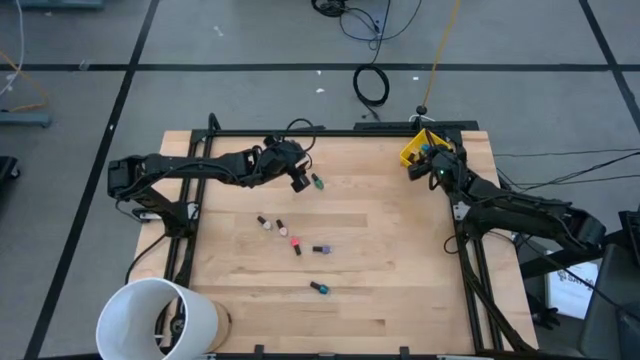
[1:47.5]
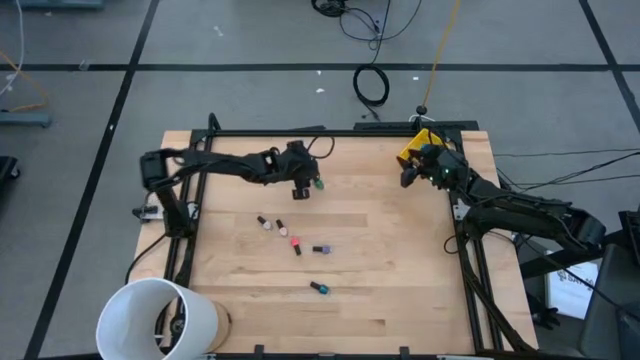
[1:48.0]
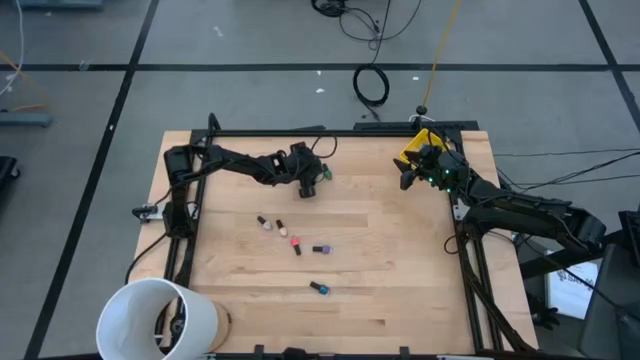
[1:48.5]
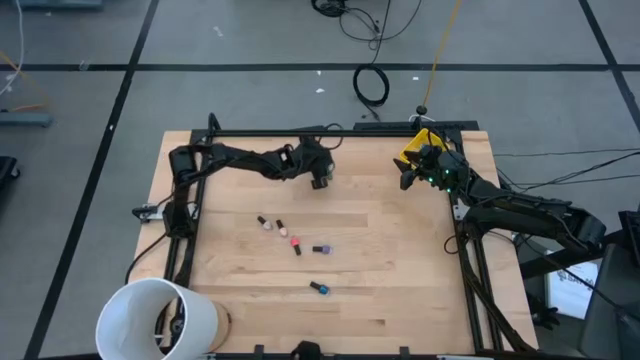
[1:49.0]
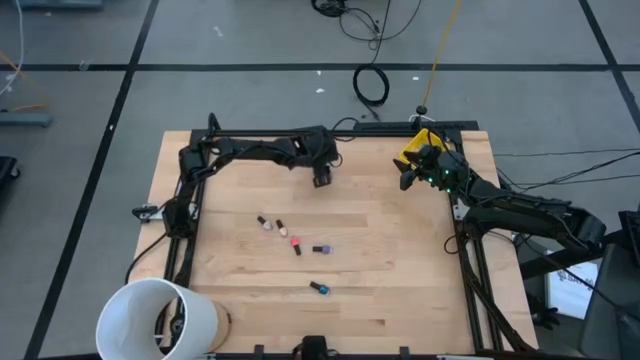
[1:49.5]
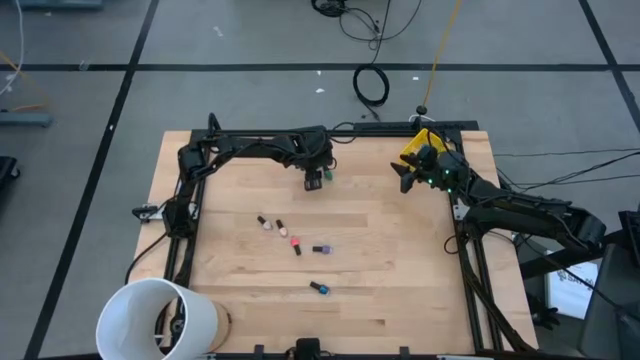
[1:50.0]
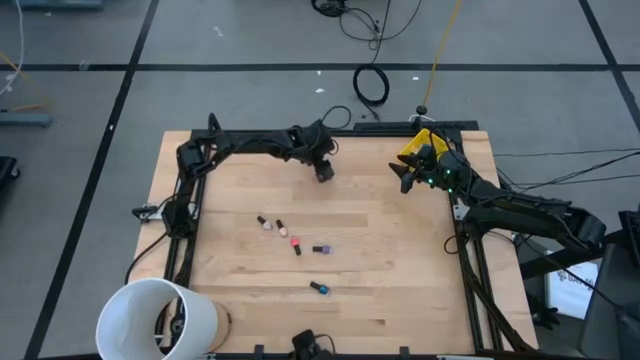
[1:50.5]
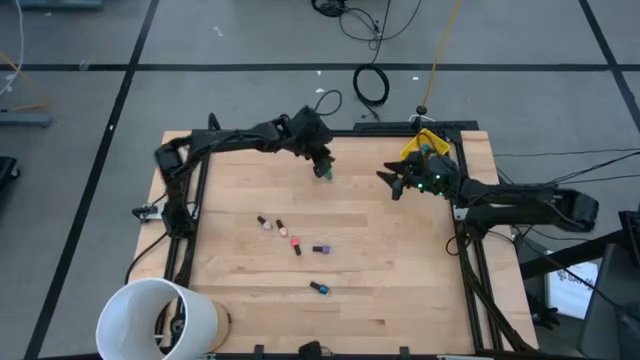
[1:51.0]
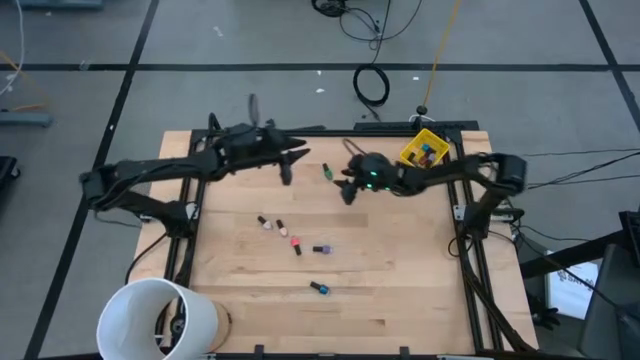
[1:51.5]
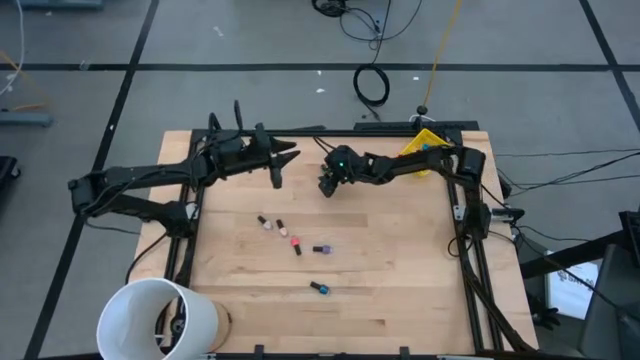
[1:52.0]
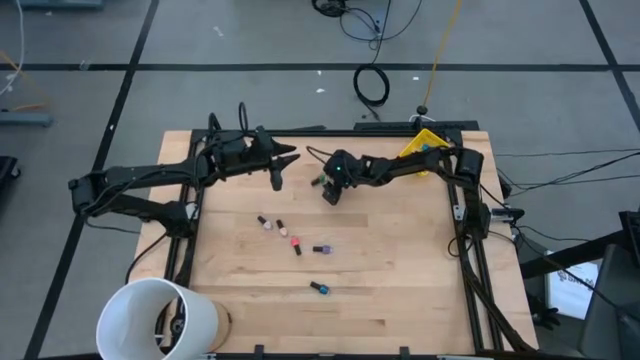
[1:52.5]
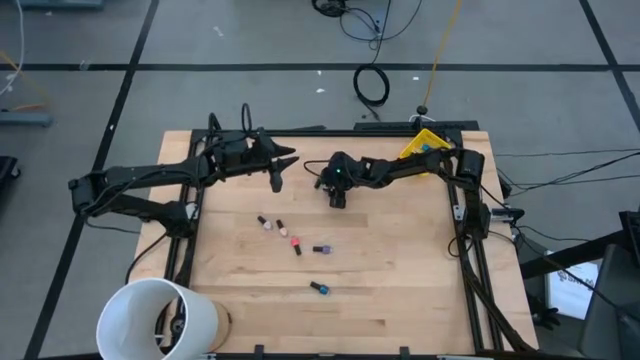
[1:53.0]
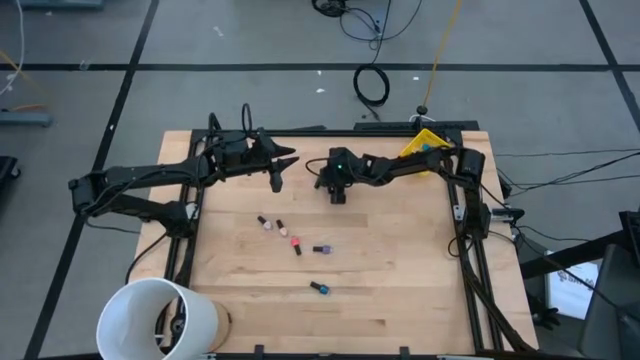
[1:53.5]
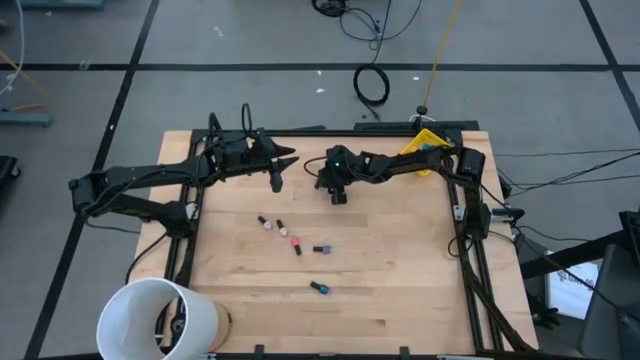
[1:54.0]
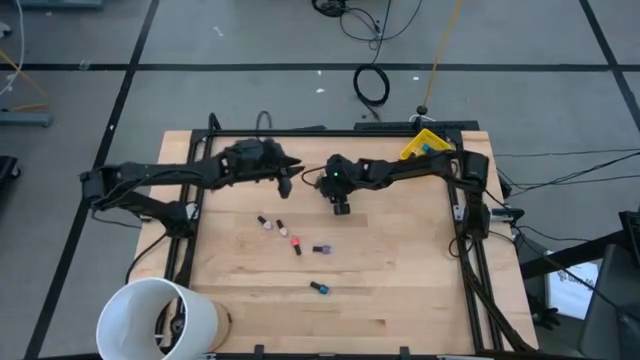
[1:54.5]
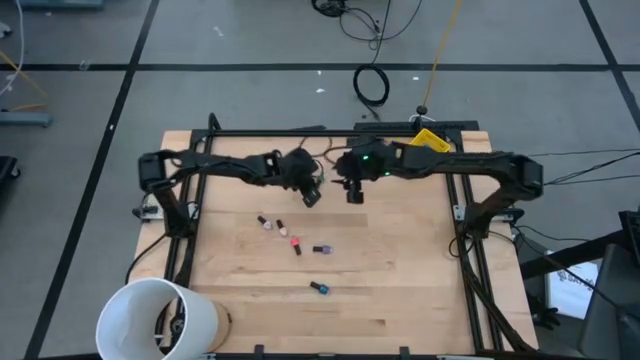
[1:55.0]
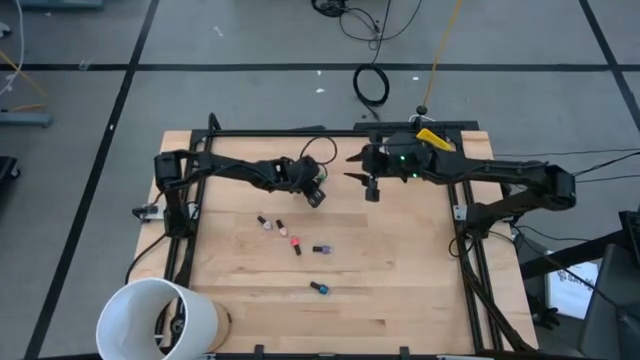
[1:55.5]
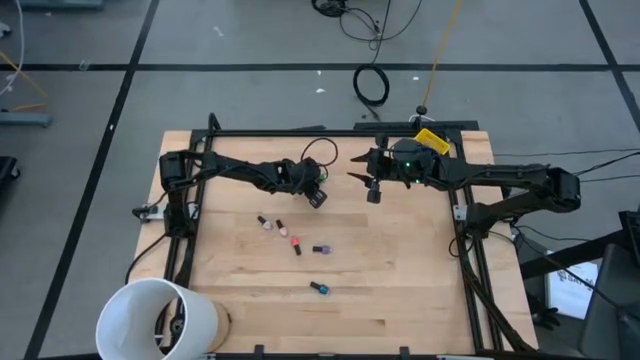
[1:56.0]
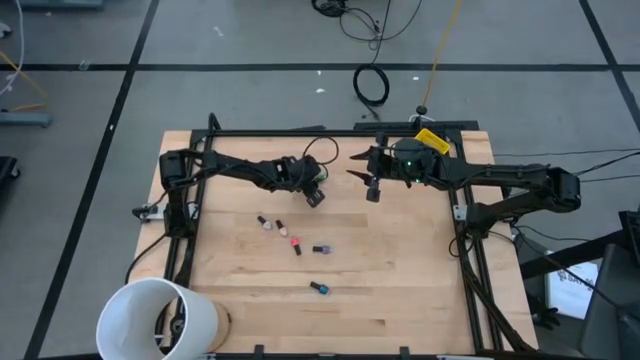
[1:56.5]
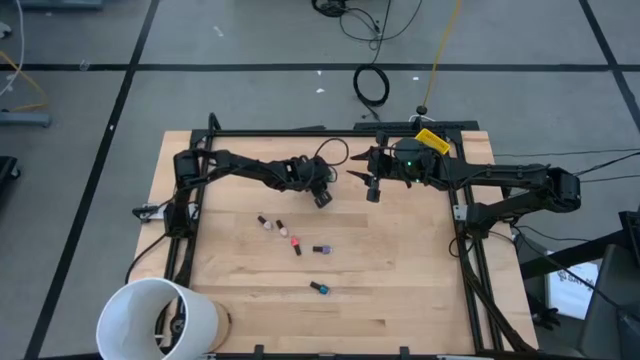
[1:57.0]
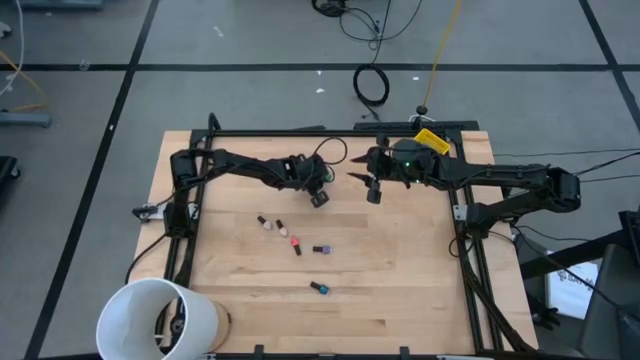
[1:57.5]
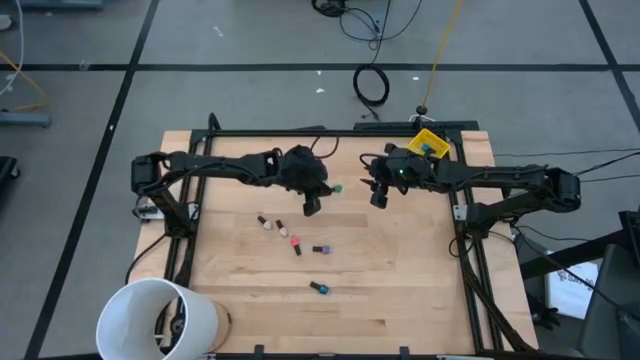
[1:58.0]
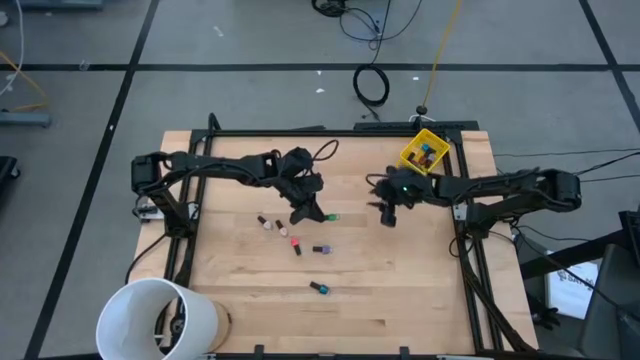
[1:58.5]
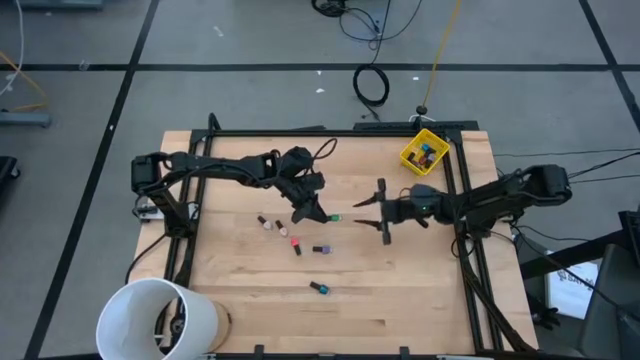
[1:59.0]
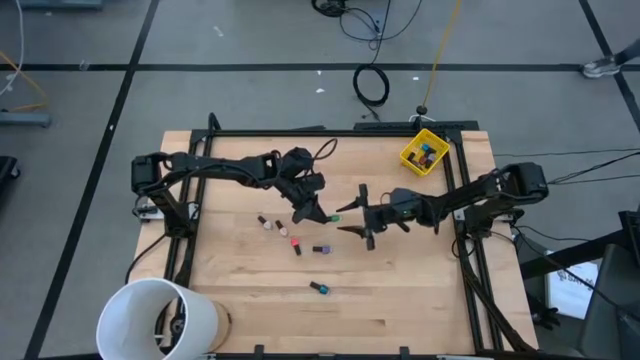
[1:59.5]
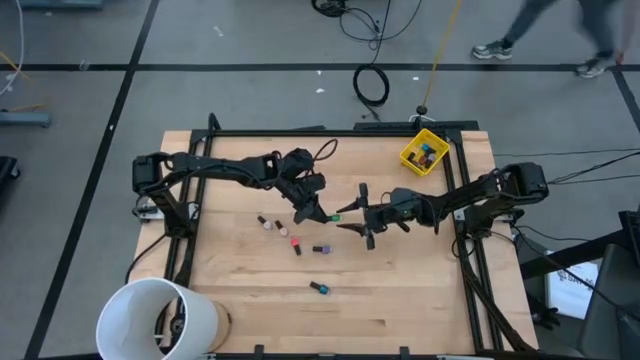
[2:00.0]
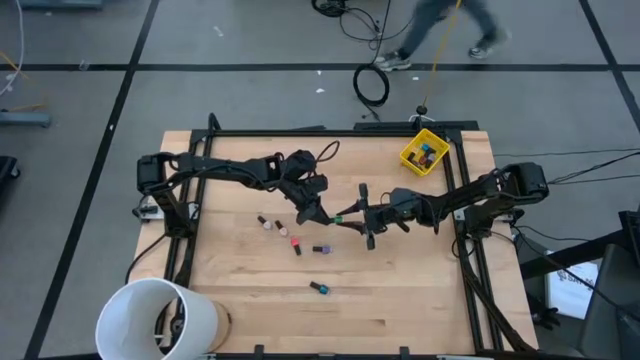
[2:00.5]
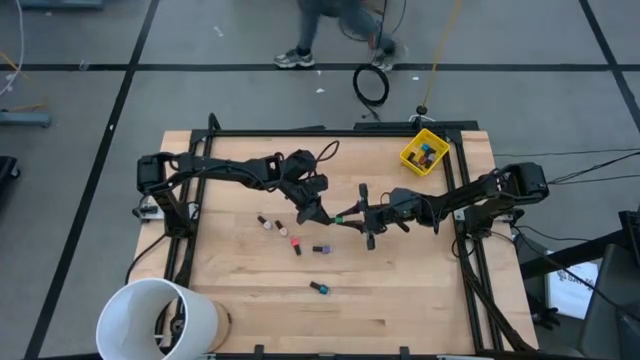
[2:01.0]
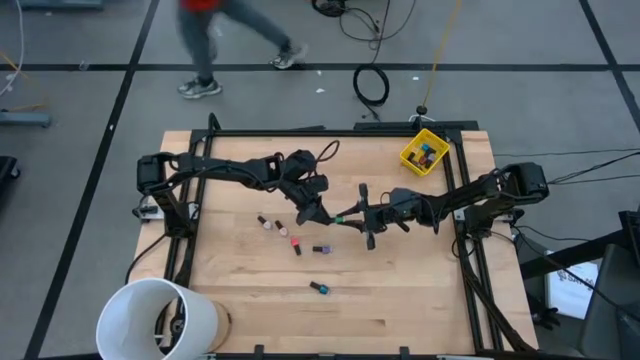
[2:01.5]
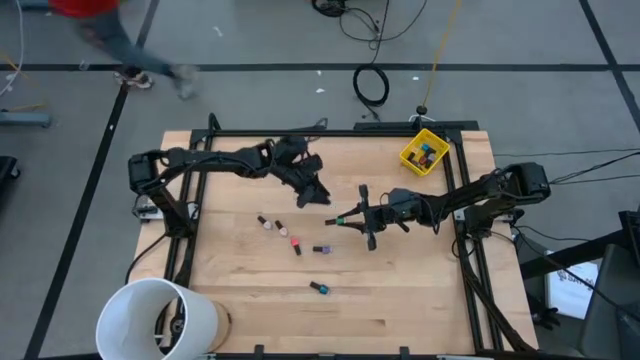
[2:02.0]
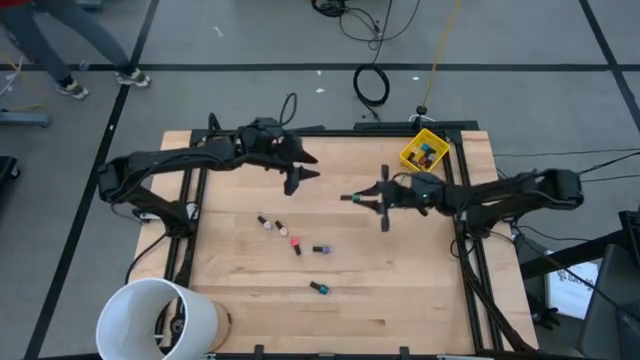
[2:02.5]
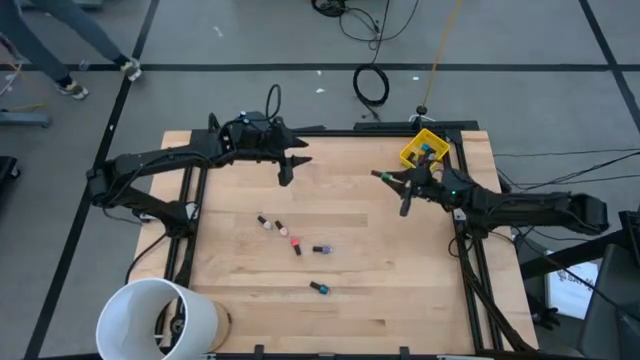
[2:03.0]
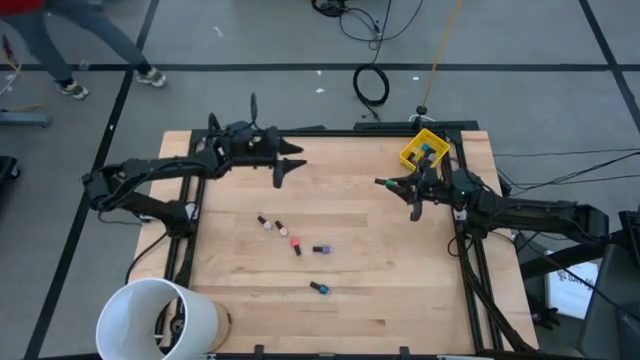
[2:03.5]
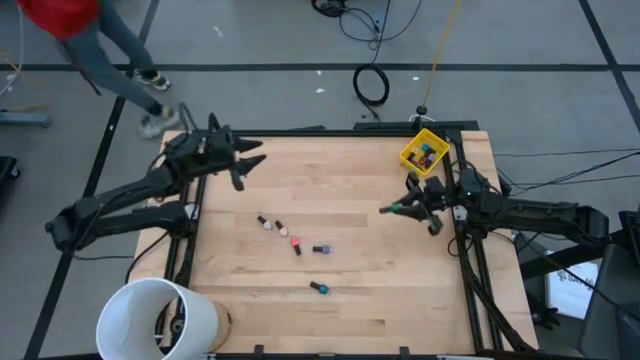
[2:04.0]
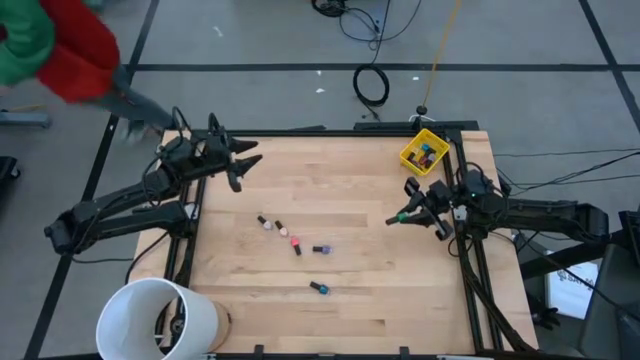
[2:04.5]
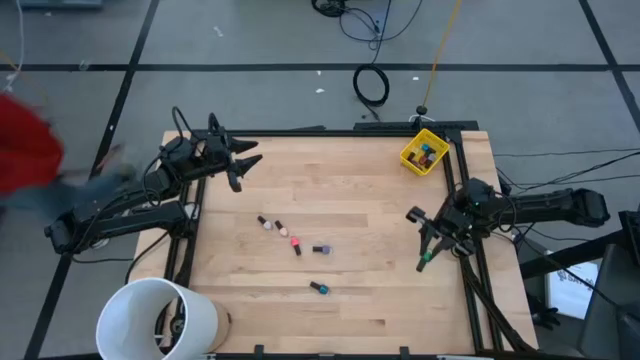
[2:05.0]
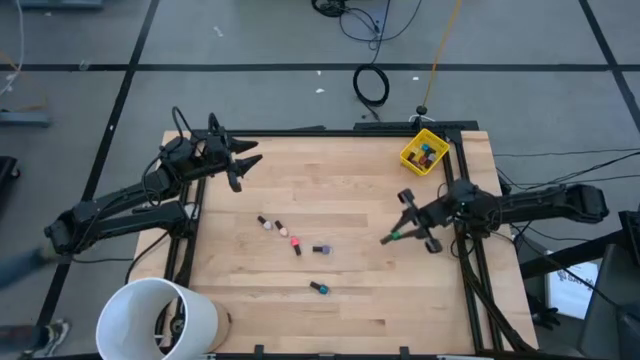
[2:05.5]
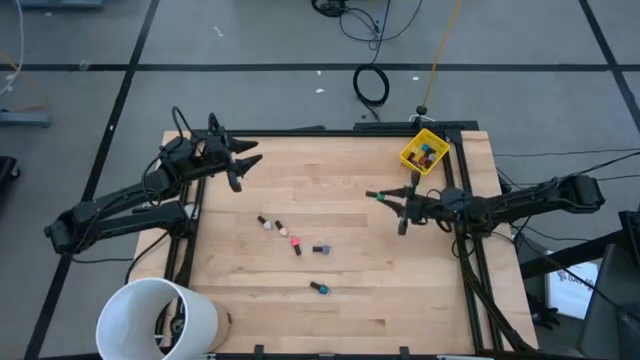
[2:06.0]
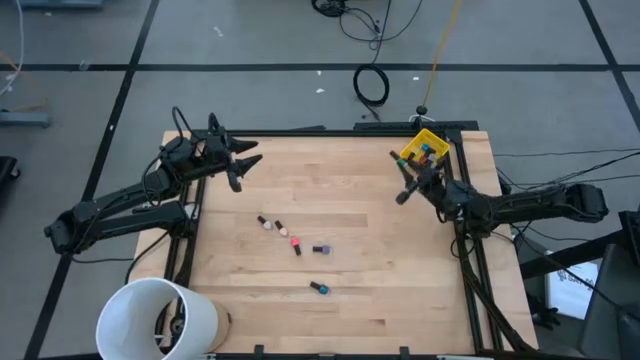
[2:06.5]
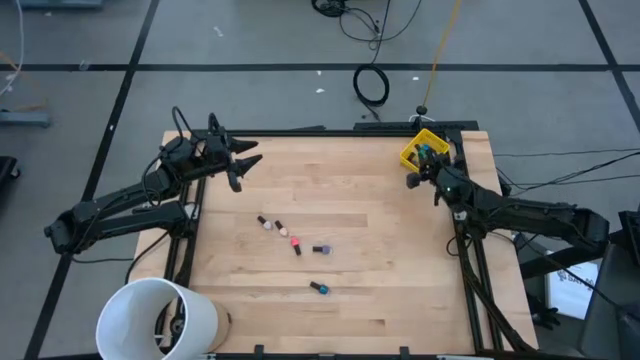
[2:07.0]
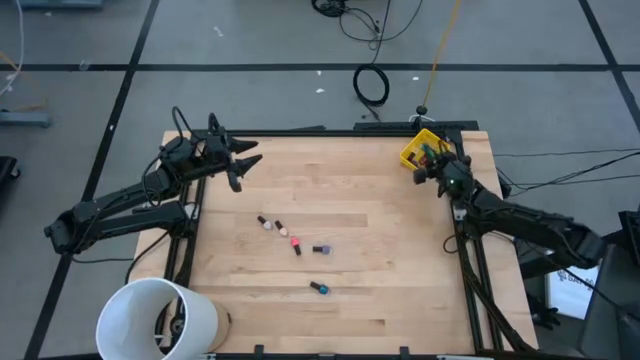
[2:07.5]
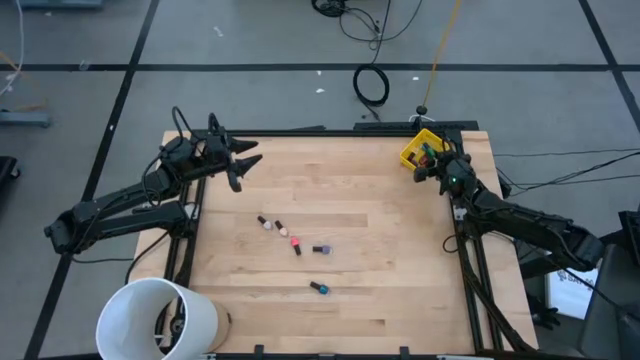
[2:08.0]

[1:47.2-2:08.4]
Task: Pick & Place Nail Polish
Put the green nail polish bottle into the yellow bin

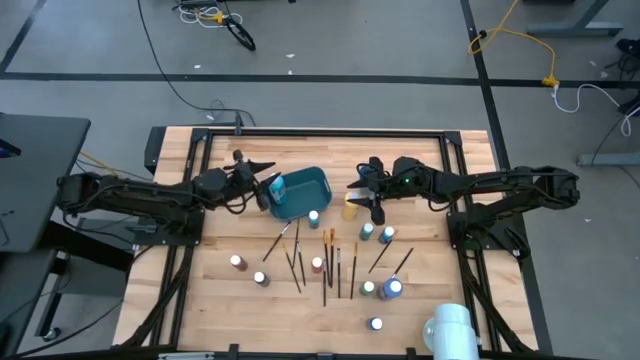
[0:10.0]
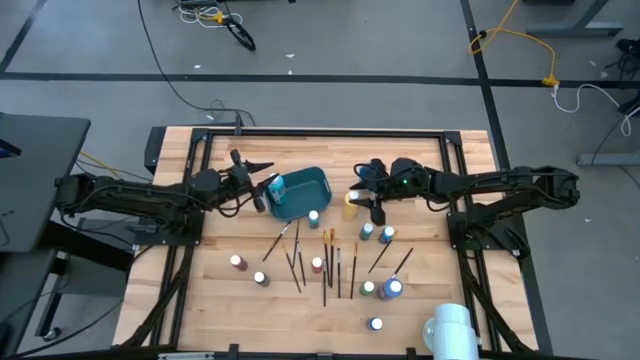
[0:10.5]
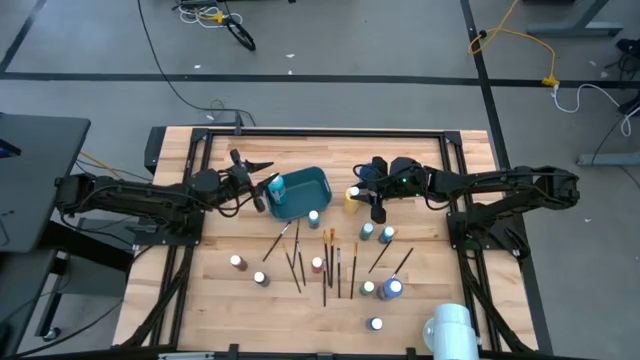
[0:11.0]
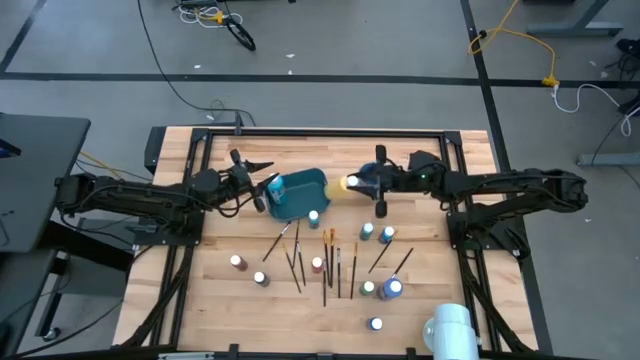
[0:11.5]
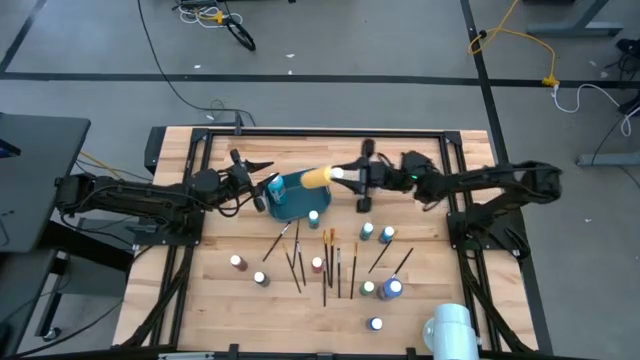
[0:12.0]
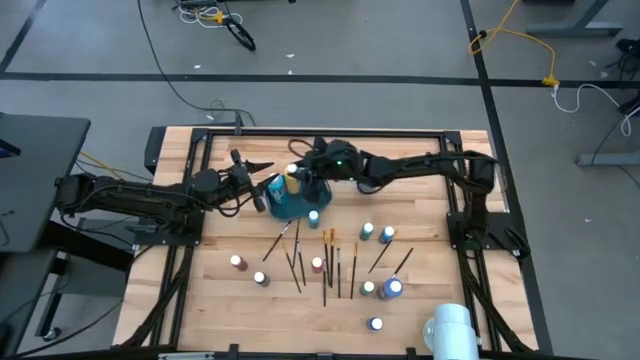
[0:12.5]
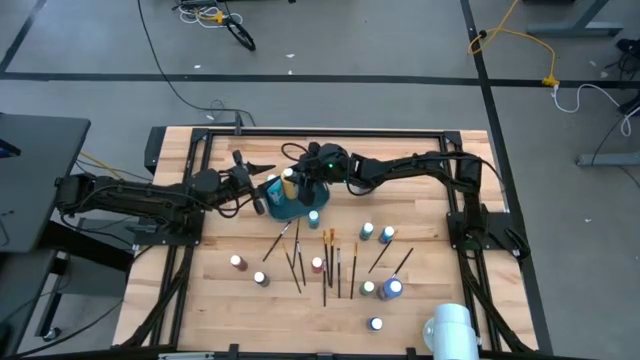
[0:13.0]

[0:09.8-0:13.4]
Task: Pick & Place Paint Supplies
Put the yellow paint bottle into the blue bin
